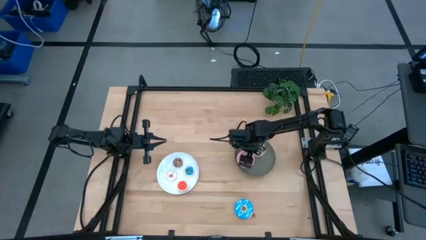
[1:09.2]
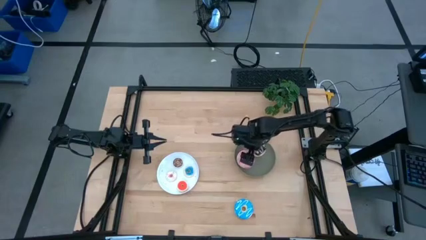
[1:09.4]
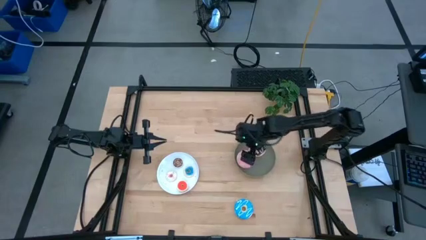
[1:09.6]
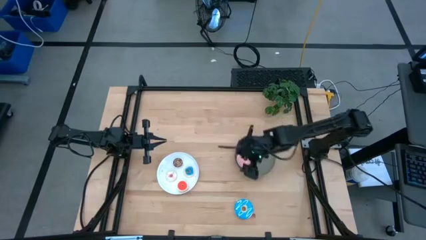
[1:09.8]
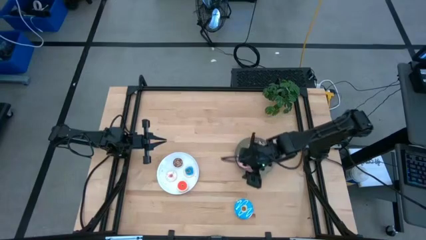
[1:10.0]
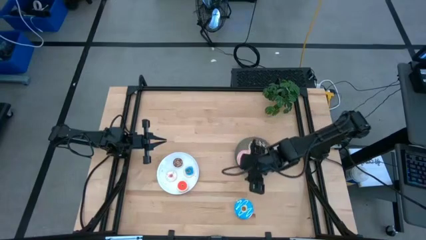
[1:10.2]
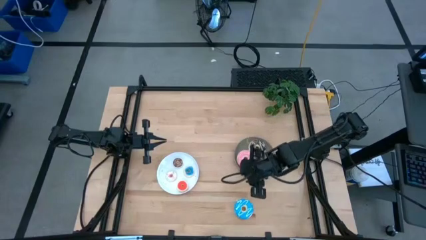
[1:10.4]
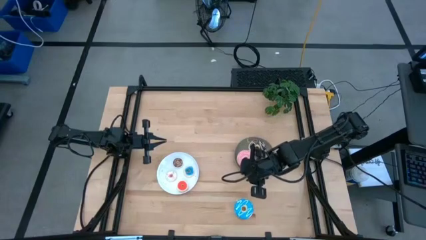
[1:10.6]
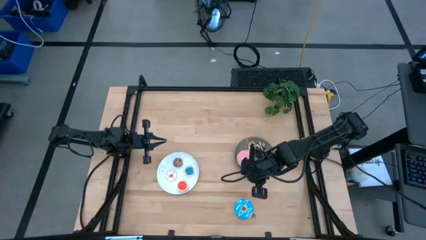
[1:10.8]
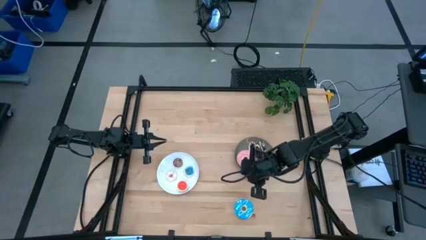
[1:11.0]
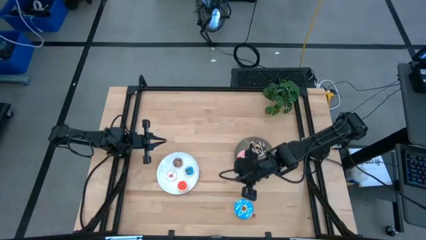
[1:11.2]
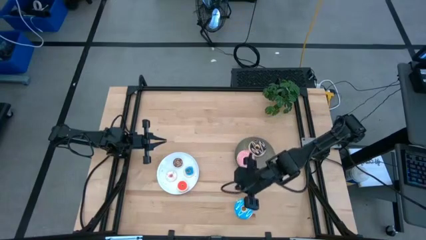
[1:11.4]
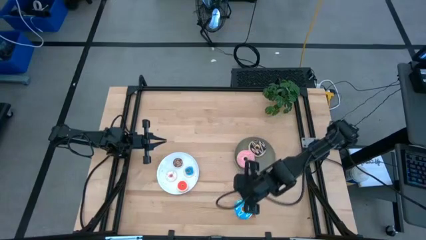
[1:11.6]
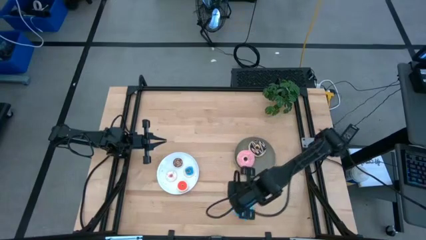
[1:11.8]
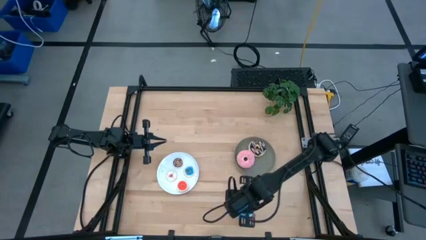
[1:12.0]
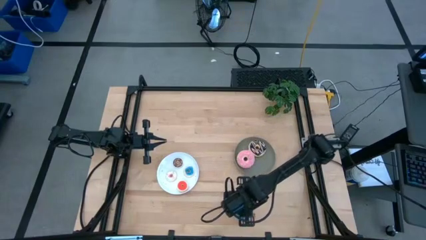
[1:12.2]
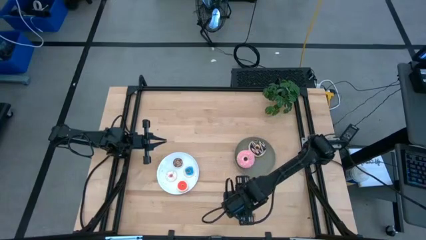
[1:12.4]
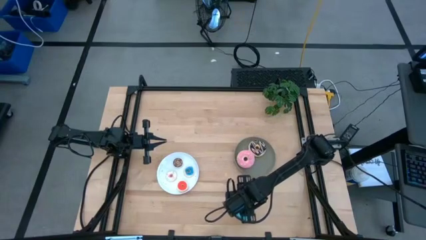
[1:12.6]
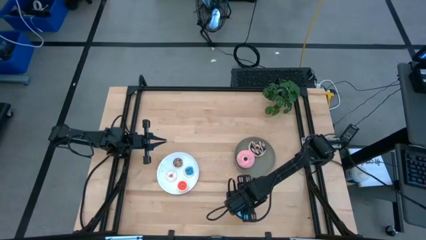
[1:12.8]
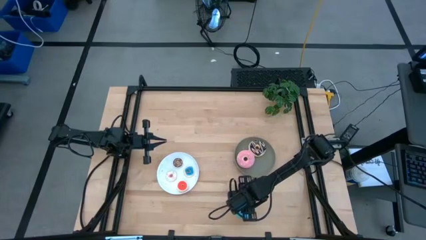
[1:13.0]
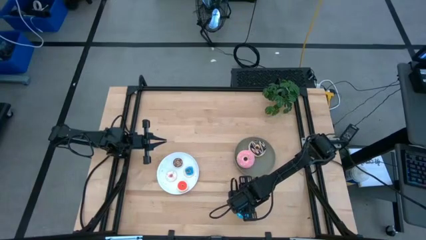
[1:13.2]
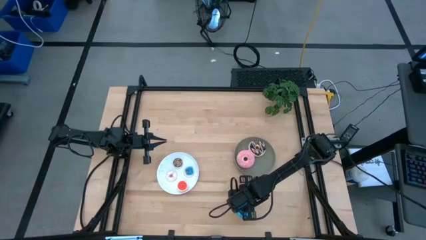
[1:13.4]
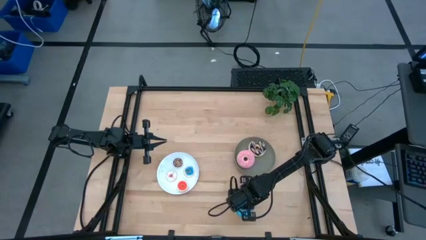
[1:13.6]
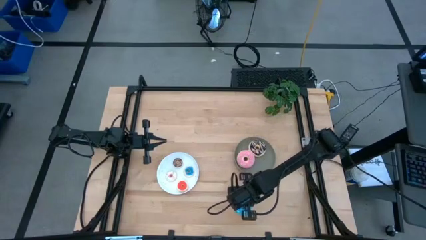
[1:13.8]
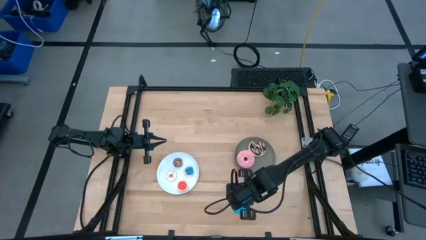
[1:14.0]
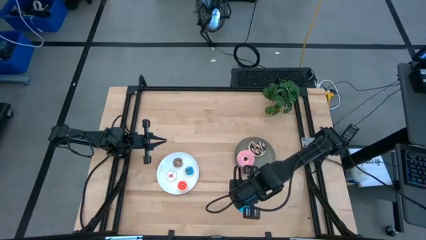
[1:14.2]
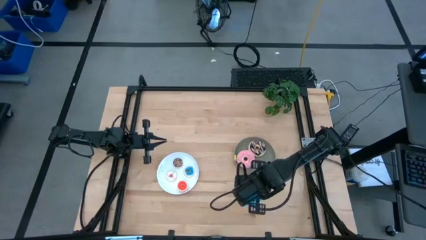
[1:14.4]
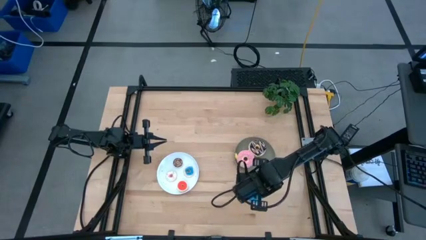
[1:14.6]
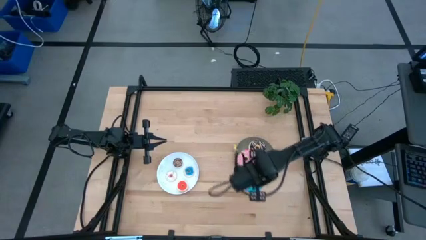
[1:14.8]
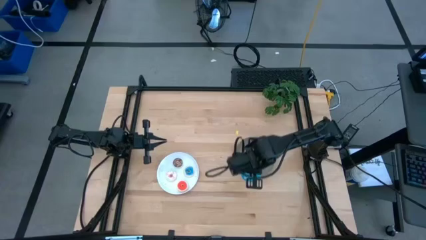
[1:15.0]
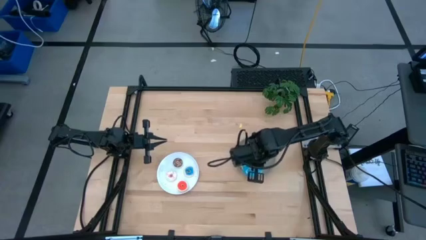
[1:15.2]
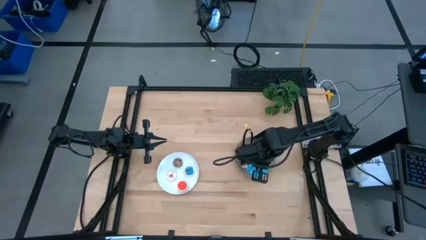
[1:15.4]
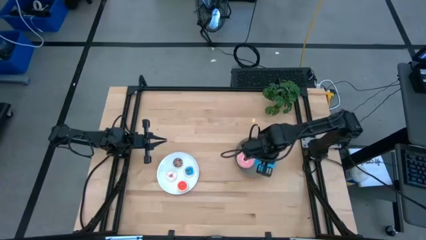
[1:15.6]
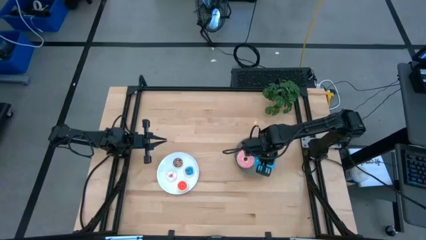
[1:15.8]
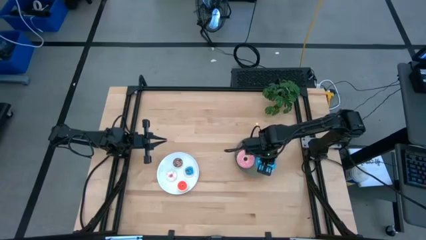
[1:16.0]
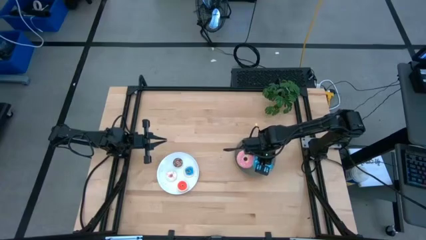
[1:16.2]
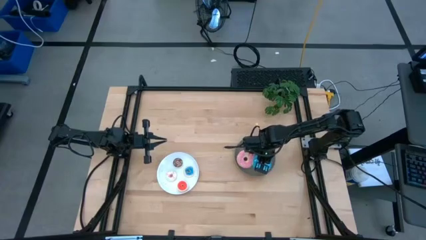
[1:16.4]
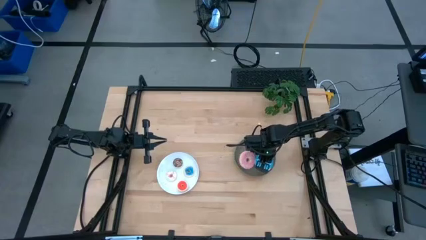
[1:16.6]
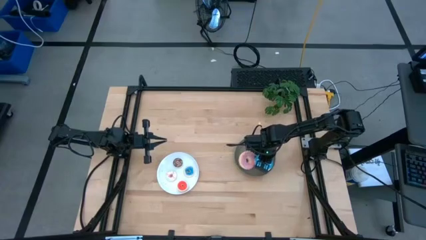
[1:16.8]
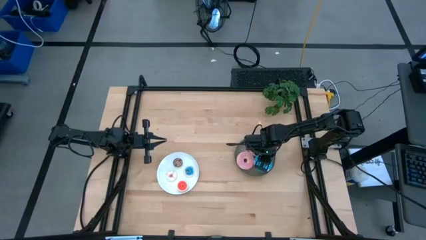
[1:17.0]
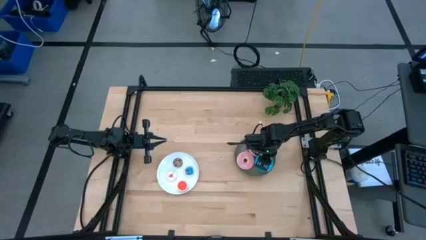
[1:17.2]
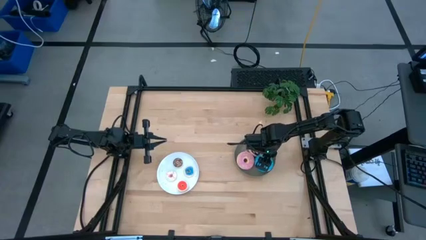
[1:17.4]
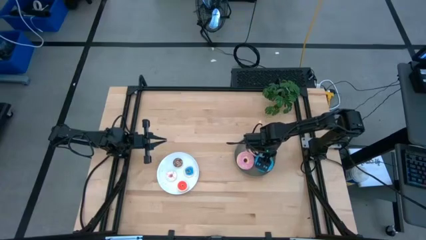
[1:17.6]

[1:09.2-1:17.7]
Task: Pick & Place donuts
Put the big blue donut on the gray plate

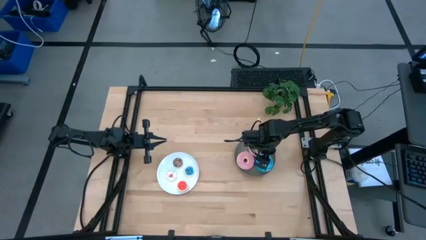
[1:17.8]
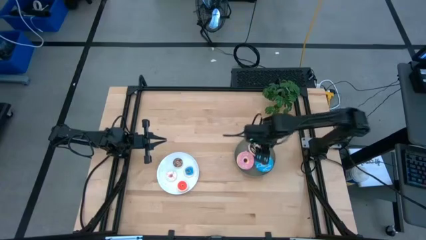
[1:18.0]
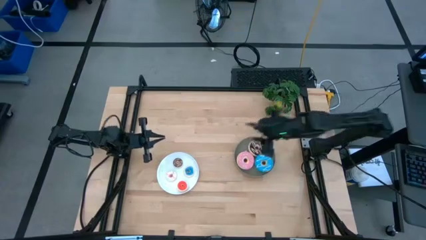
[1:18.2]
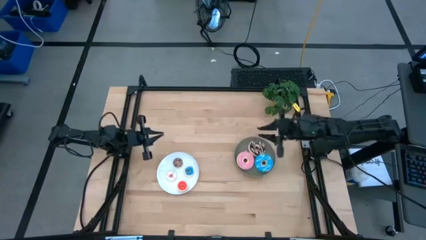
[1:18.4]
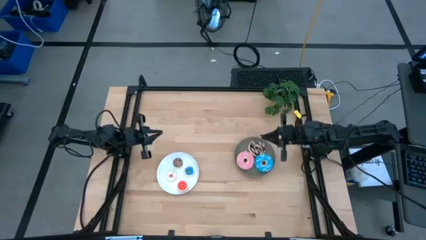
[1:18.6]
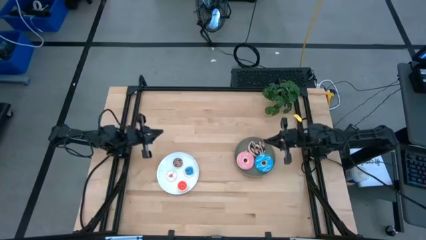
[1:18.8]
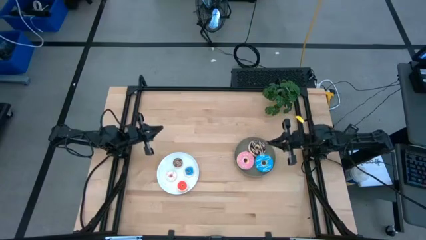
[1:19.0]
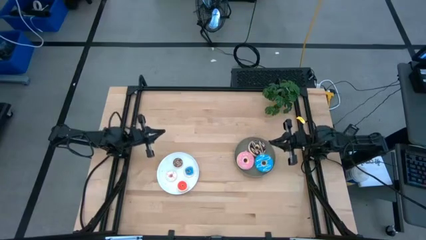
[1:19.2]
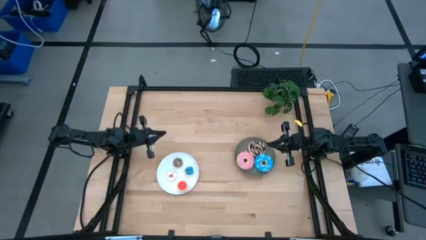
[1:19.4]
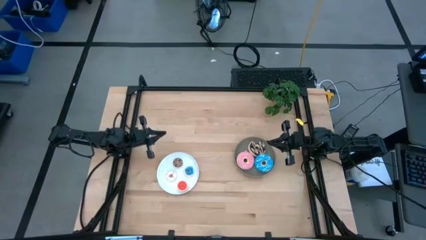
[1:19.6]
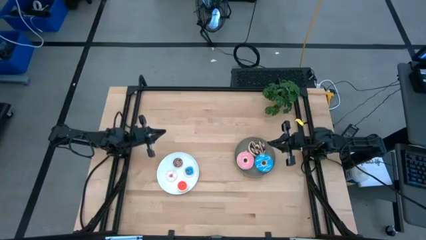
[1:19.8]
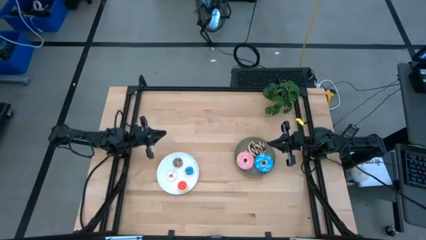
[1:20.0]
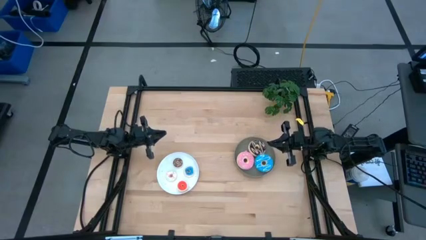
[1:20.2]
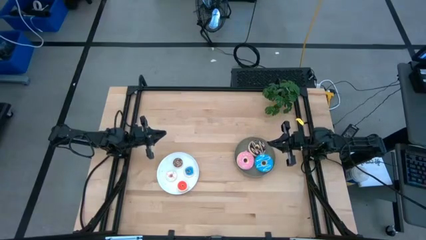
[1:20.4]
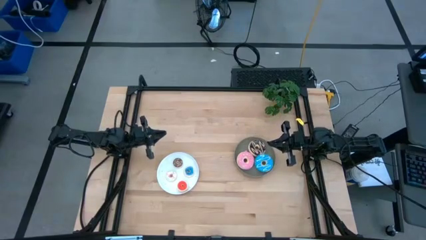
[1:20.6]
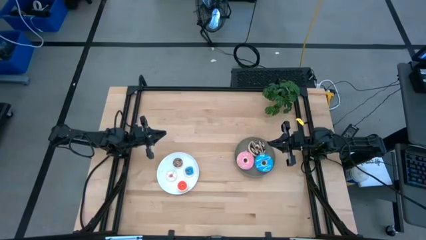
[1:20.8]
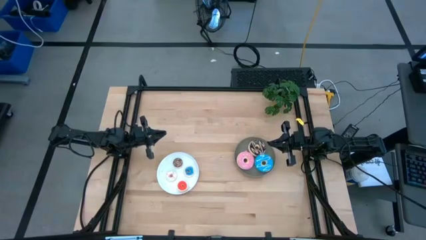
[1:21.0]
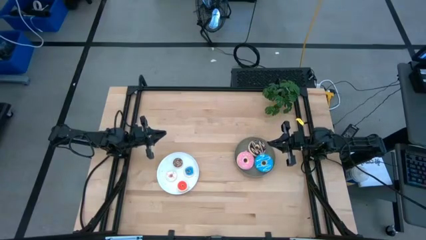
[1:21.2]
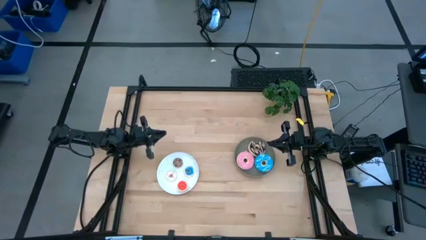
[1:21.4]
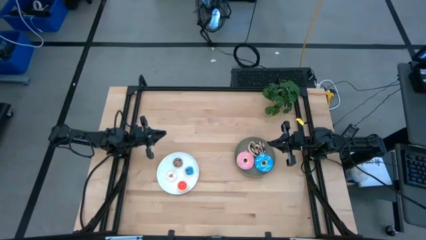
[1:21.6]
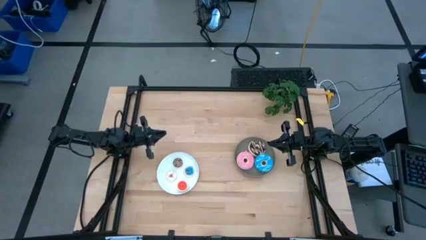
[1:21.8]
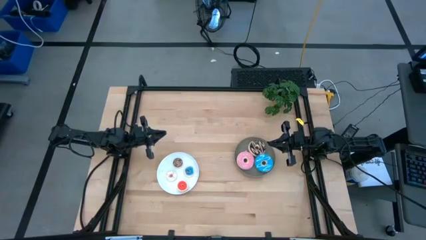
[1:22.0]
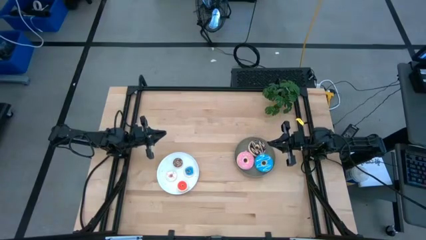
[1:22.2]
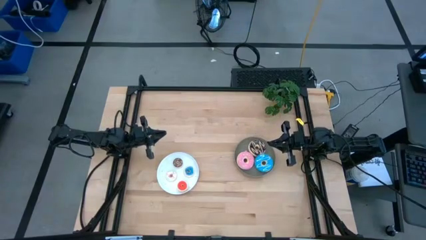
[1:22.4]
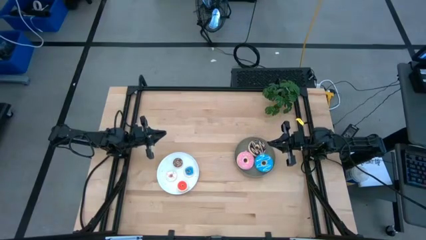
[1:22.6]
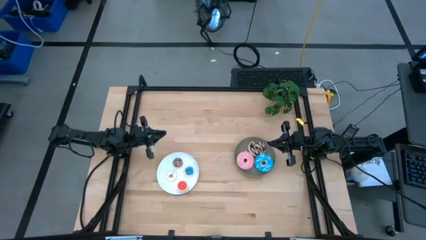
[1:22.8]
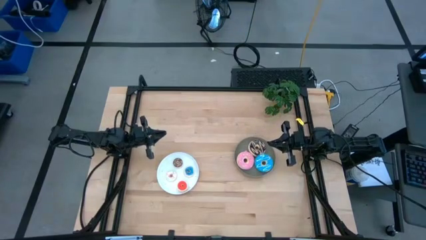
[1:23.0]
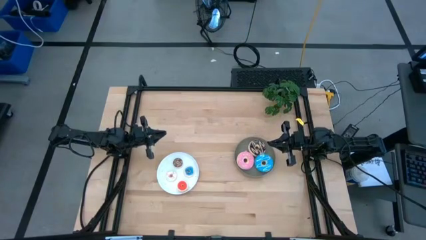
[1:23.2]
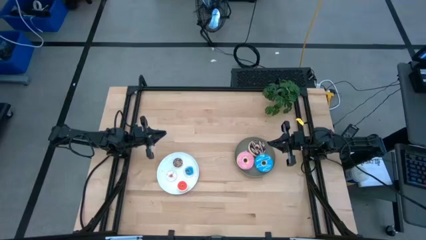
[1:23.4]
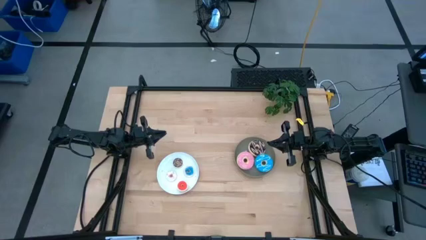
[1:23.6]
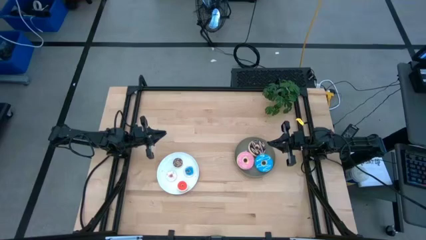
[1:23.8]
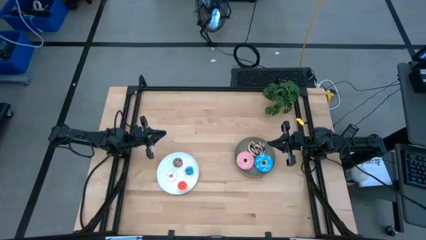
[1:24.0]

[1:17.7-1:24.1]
Return to Home Position

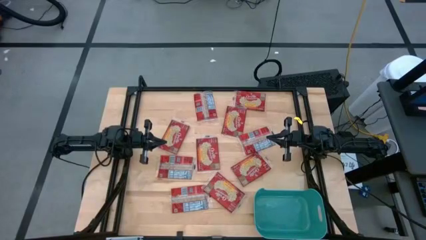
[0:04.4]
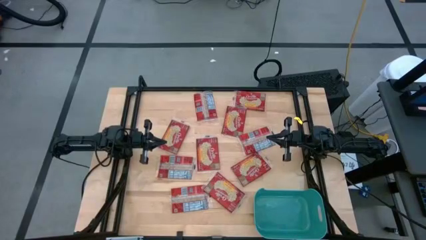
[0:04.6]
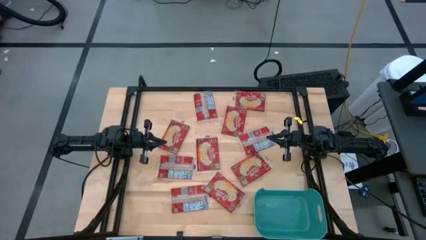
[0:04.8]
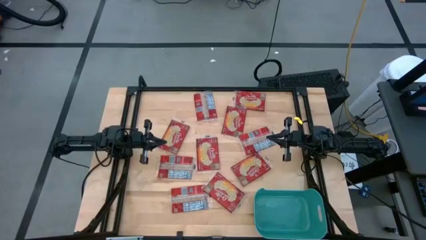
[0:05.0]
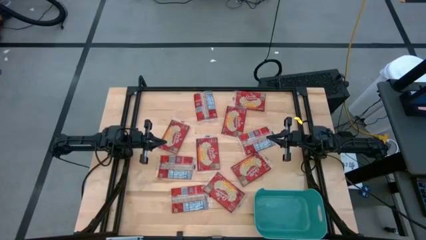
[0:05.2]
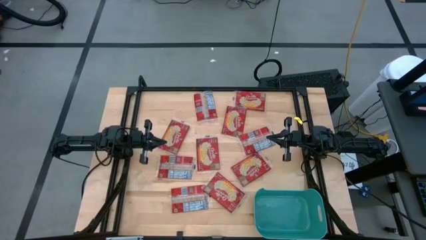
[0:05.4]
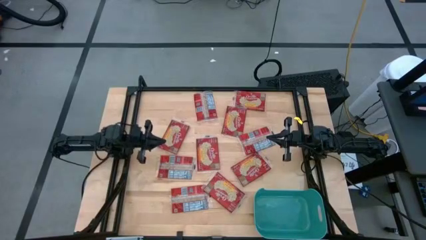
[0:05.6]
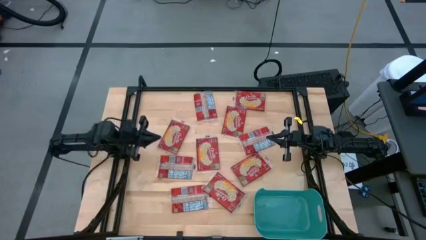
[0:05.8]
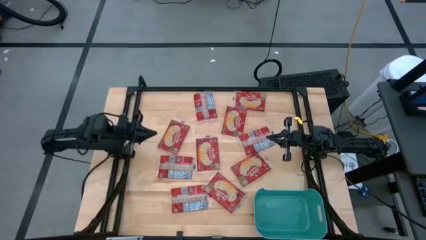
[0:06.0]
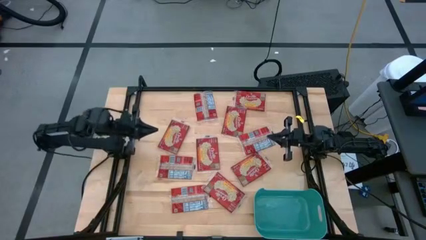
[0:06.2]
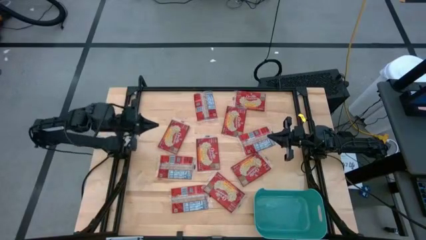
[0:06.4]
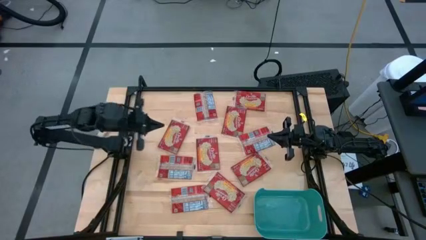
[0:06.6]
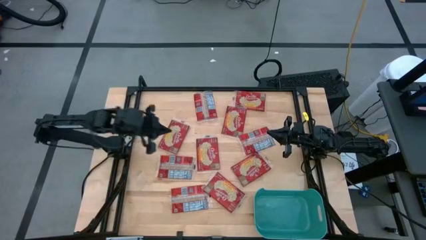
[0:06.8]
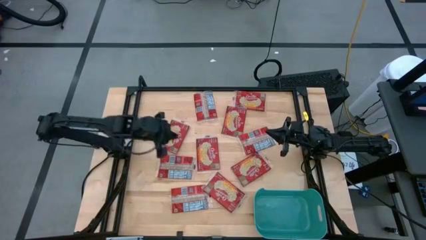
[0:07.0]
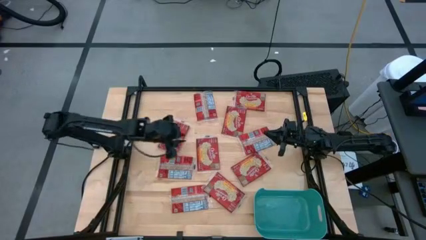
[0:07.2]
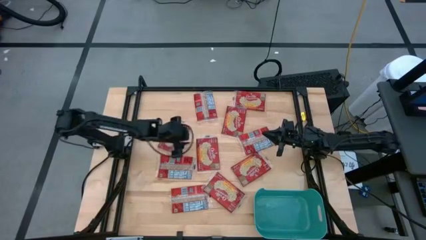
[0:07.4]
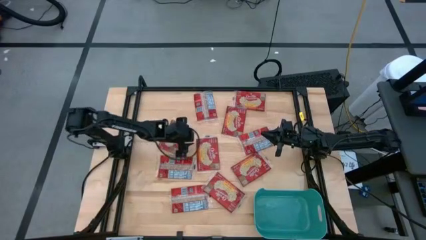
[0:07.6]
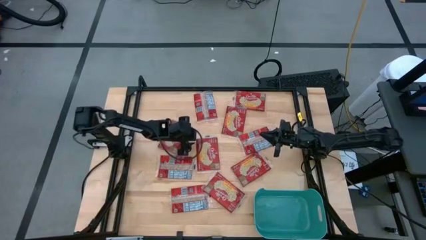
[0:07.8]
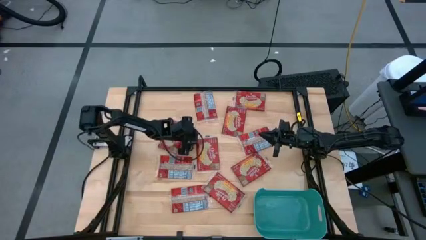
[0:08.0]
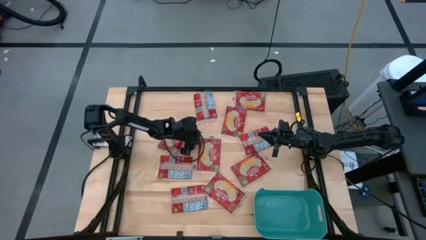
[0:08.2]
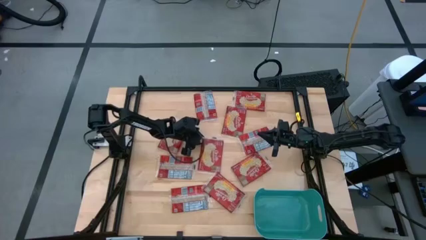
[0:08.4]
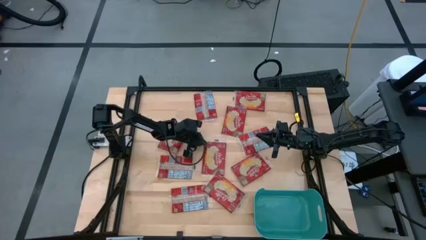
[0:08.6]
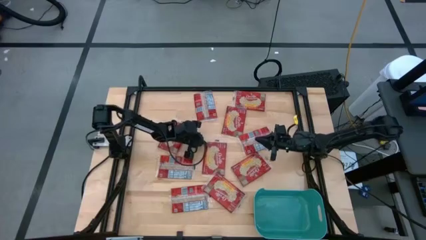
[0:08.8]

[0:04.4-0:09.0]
Task: Sort popcorn bags into baskets
Put the popcorn bag into the green bin
